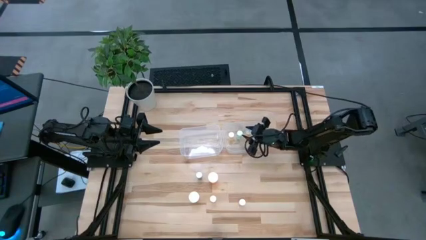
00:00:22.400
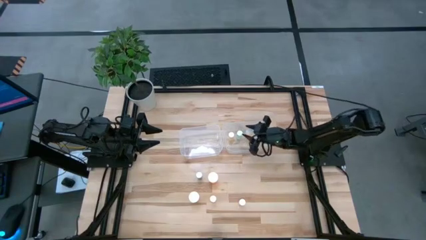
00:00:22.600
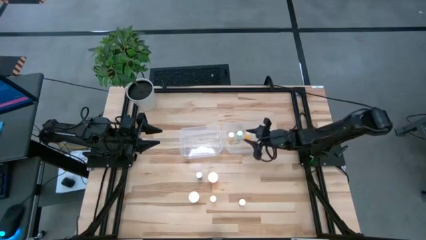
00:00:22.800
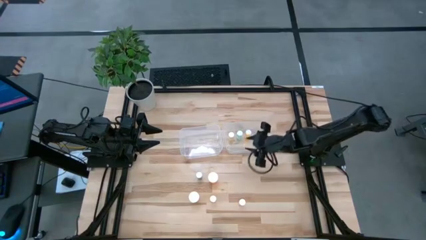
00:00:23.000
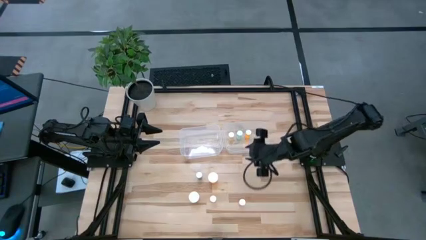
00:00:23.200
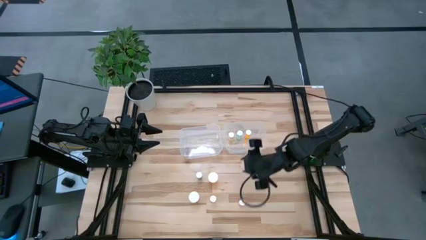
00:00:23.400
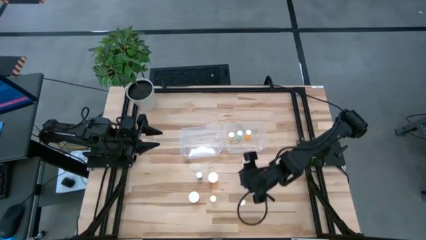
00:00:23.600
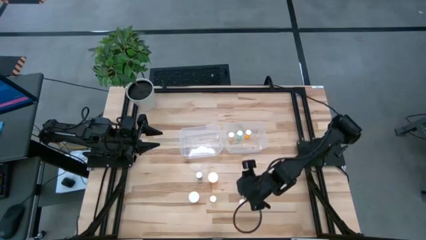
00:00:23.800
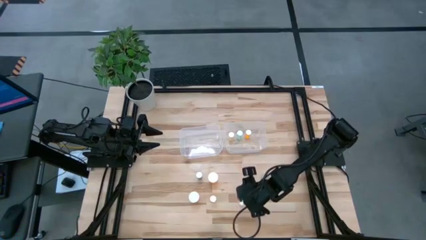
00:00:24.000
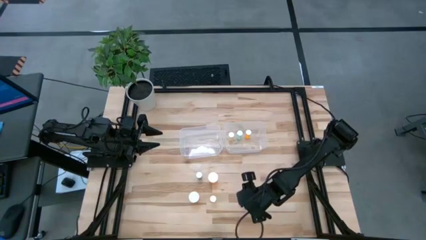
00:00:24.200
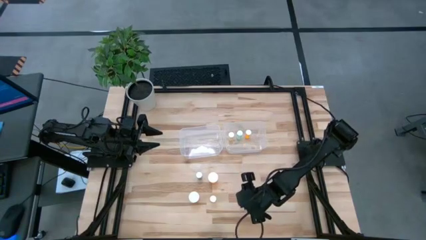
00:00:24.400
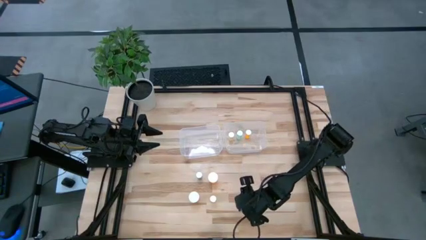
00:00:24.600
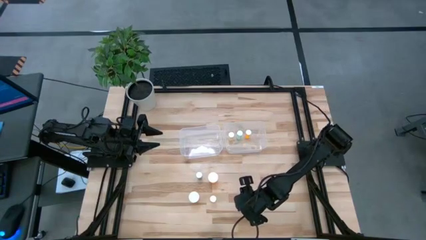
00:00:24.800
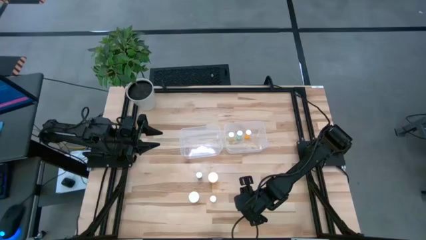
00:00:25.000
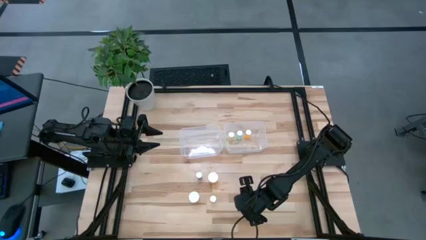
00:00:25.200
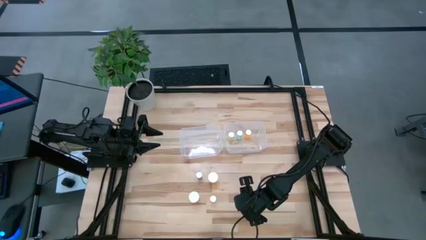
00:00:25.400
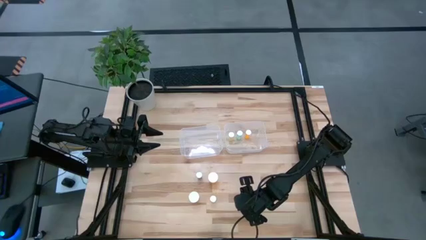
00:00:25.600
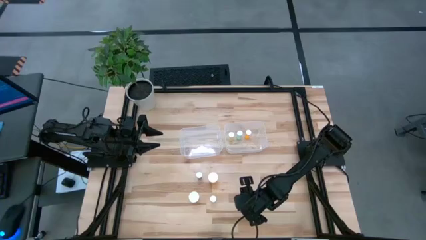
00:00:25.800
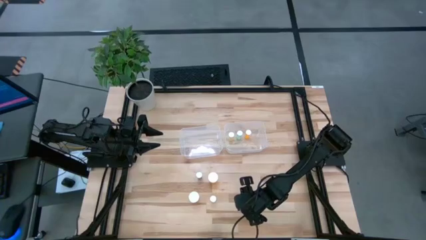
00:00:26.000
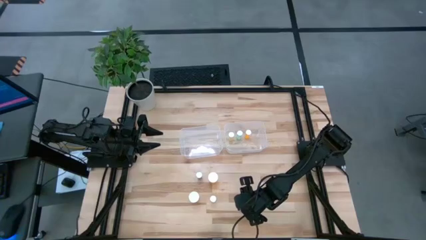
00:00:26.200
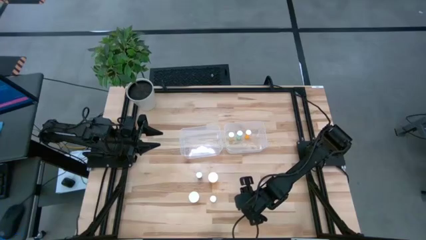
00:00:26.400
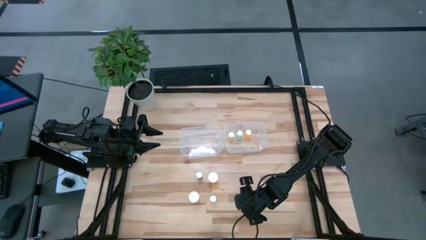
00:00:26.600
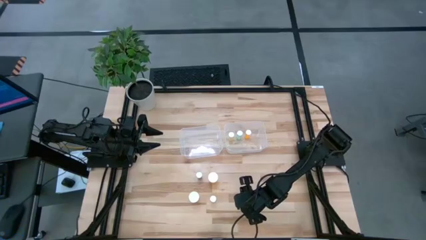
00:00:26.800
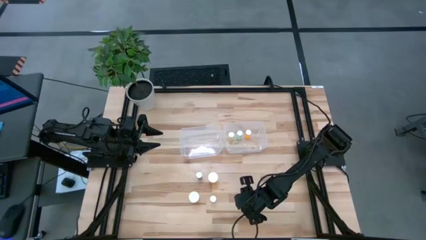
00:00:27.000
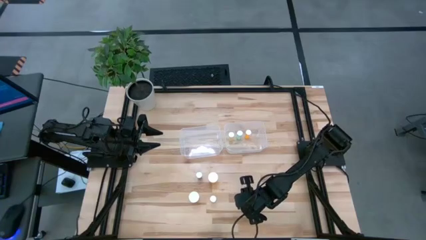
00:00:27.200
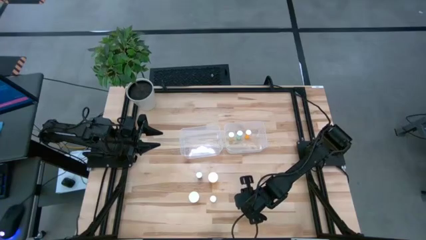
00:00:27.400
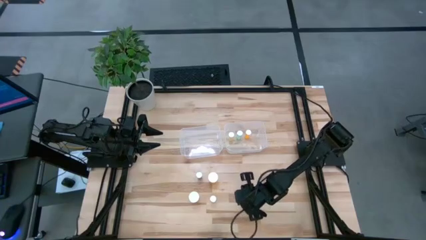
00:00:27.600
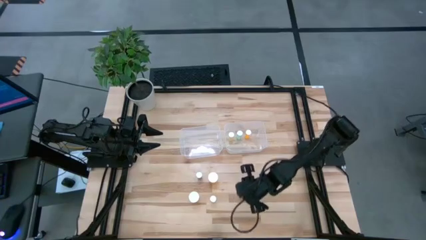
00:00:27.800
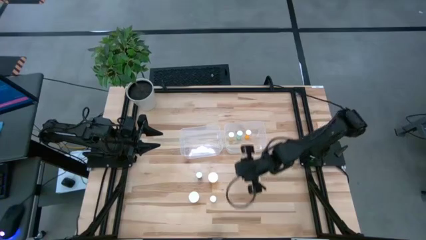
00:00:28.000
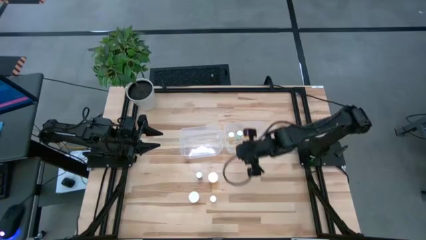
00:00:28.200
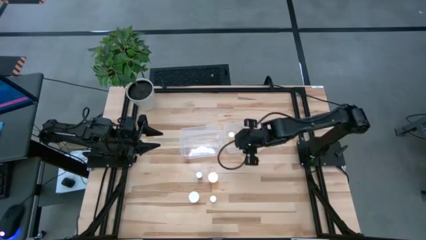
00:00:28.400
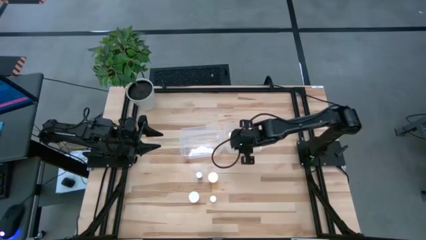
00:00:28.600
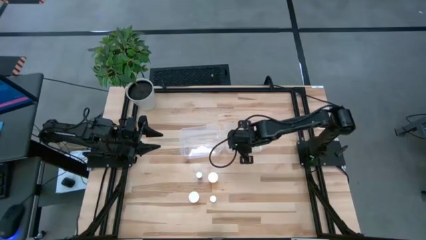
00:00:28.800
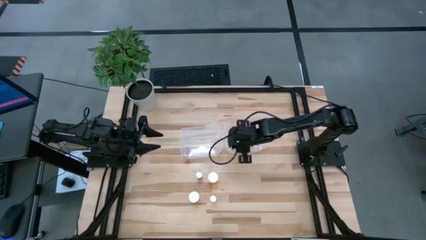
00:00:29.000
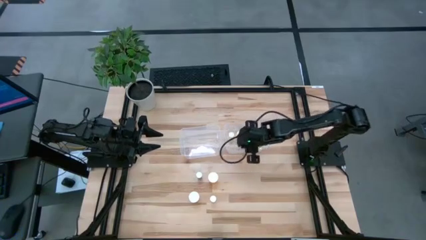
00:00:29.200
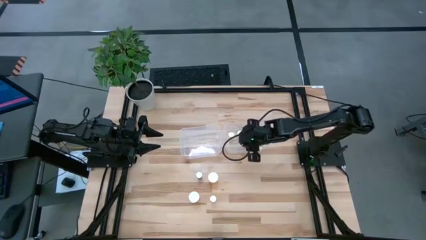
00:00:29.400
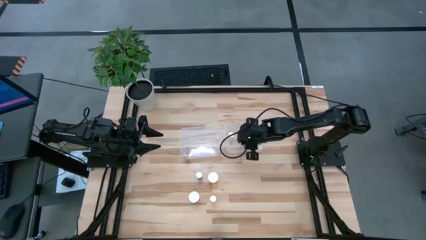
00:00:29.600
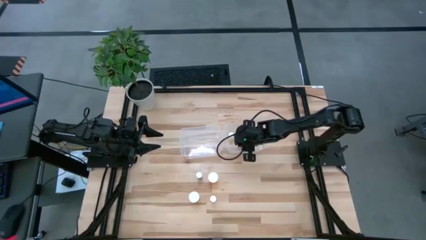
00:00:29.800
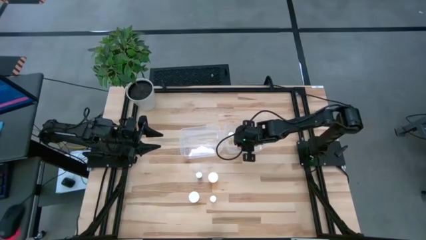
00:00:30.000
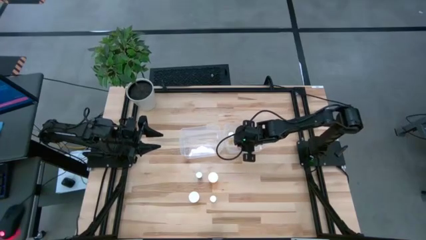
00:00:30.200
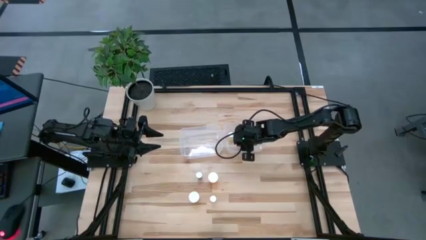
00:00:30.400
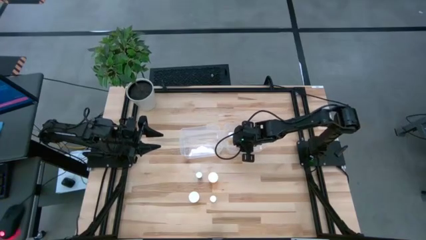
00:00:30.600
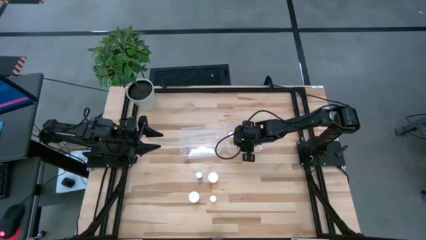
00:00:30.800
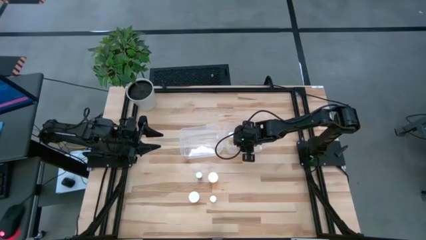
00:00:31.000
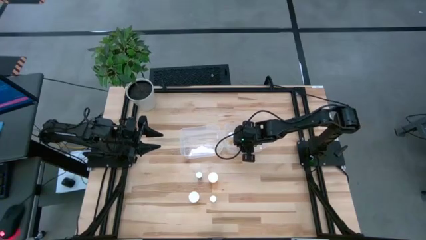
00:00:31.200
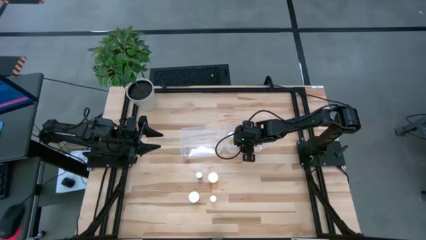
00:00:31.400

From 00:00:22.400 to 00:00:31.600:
Task: Pick and place medicine bottles into bin by pill shape (circle, oval)
Put the pink pill bottle into the right transparent bin

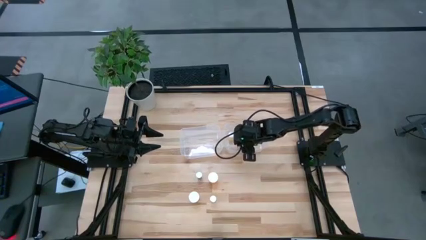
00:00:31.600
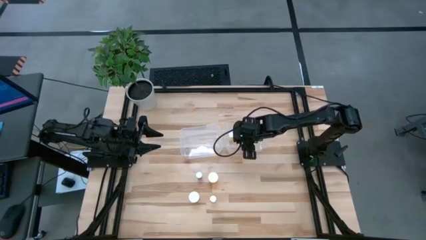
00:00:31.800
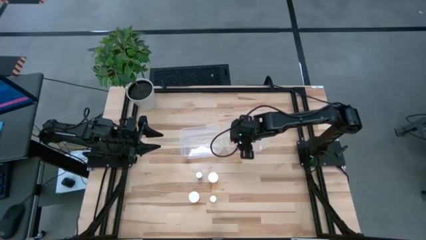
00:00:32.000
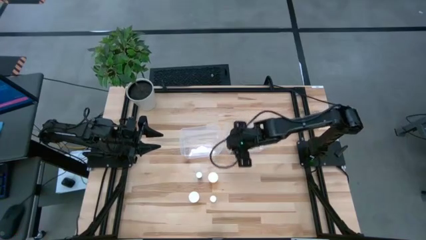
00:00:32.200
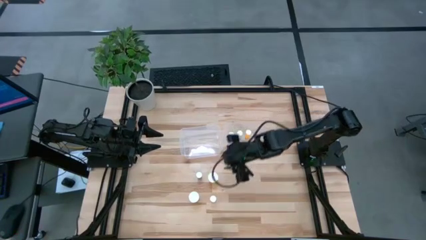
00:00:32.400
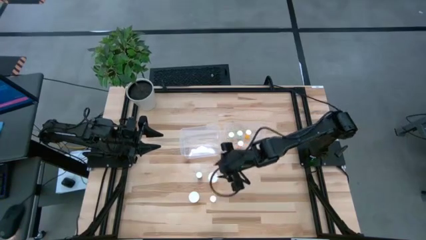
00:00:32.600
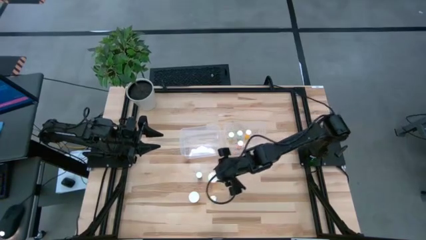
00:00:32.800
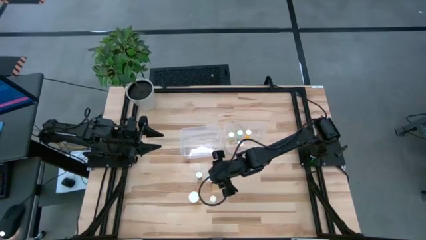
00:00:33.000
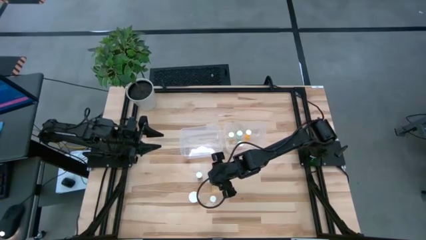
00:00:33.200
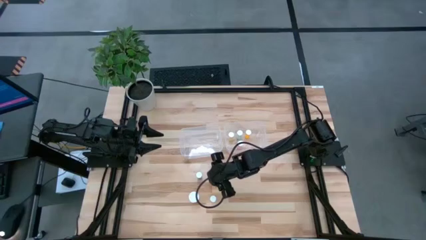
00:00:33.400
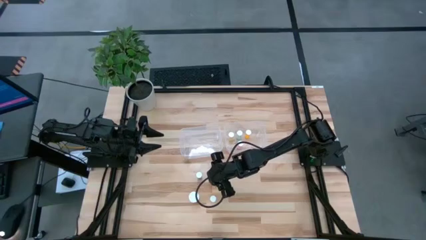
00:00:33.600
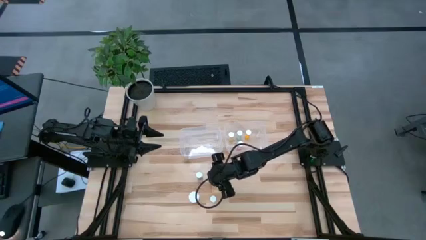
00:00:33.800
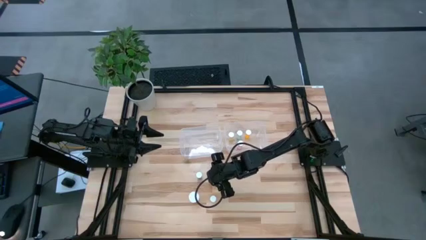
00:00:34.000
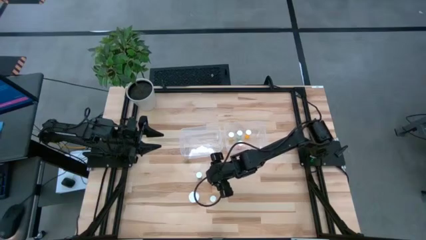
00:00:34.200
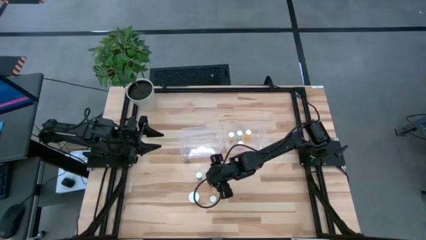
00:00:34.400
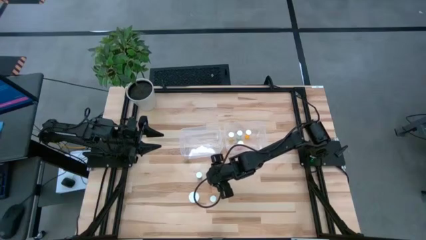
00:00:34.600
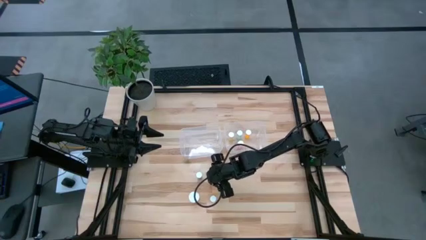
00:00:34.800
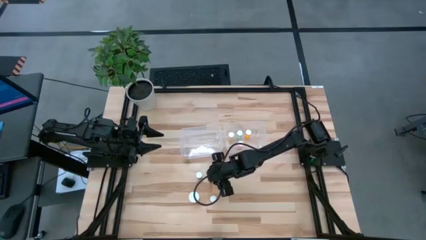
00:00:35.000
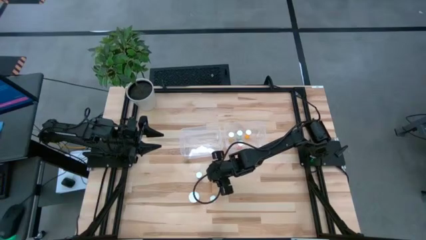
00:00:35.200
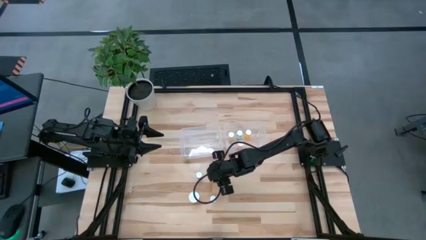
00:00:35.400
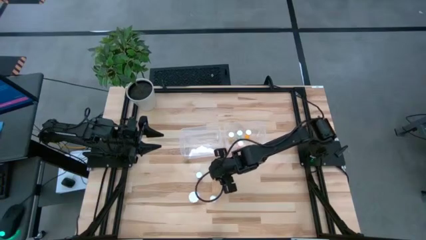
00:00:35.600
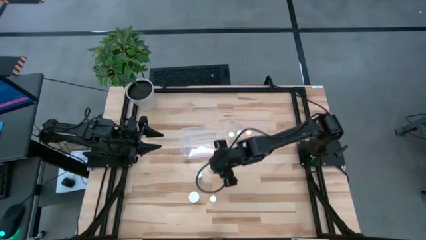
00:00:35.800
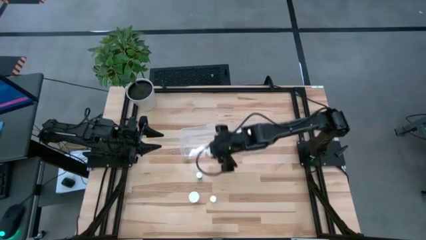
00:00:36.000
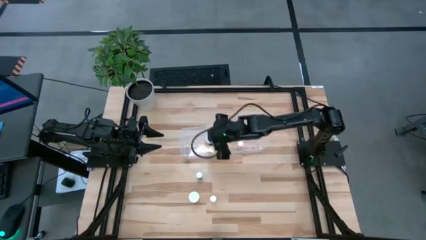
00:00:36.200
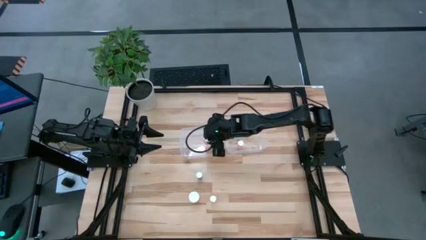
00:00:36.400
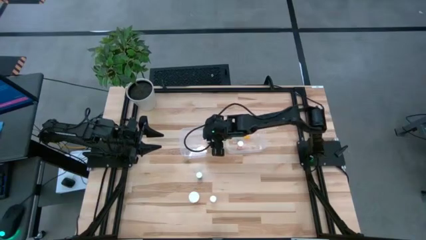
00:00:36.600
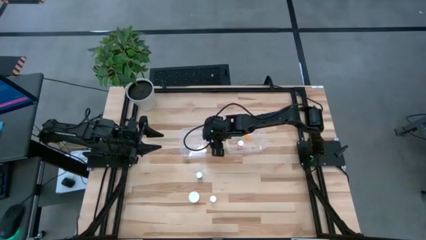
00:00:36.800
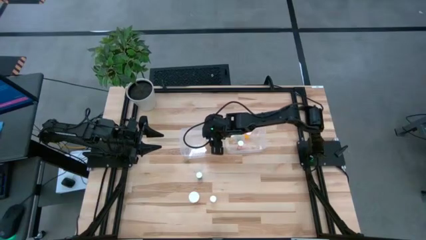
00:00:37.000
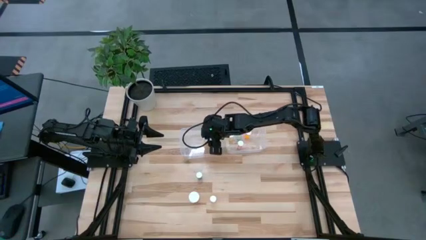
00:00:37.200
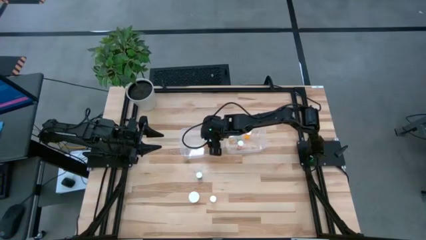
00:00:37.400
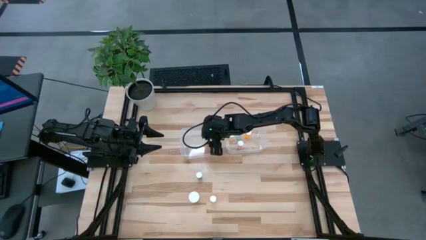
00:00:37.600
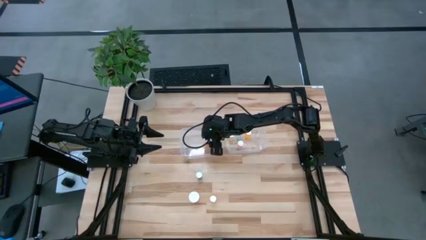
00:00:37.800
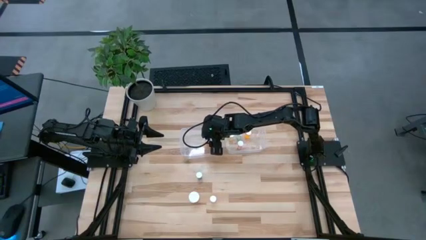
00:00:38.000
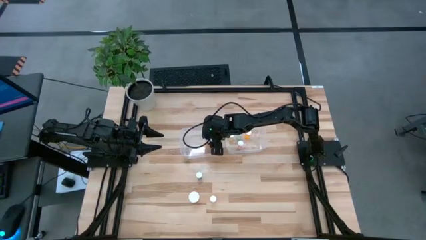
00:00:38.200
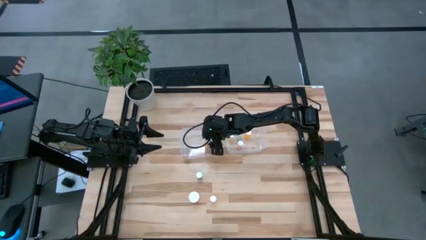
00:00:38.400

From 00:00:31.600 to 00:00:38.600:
Put the top big orange pill bottle into the left transparent bin
